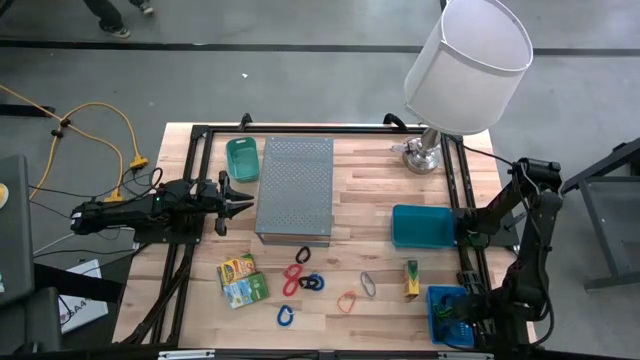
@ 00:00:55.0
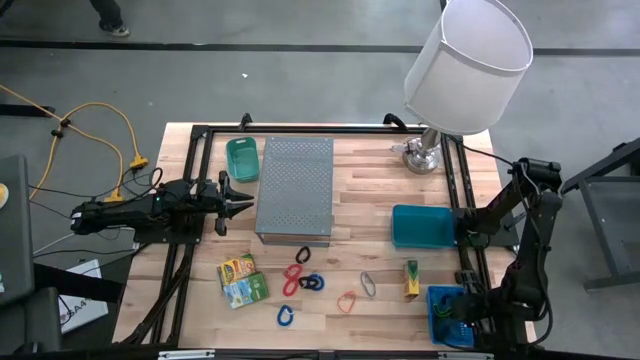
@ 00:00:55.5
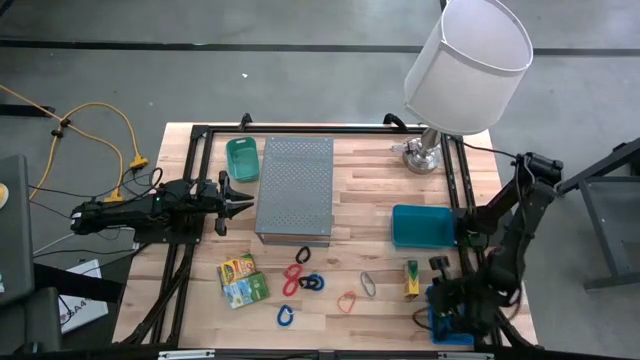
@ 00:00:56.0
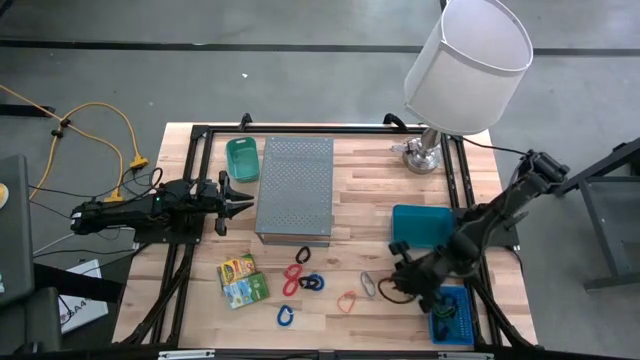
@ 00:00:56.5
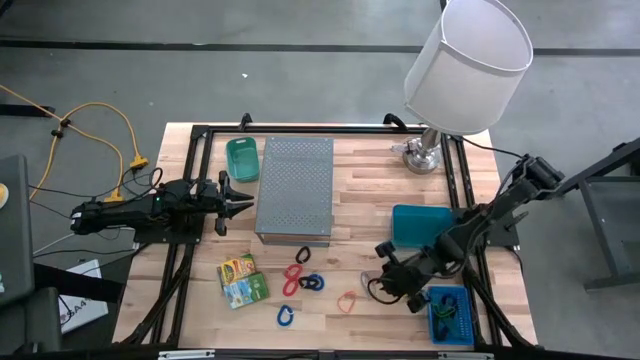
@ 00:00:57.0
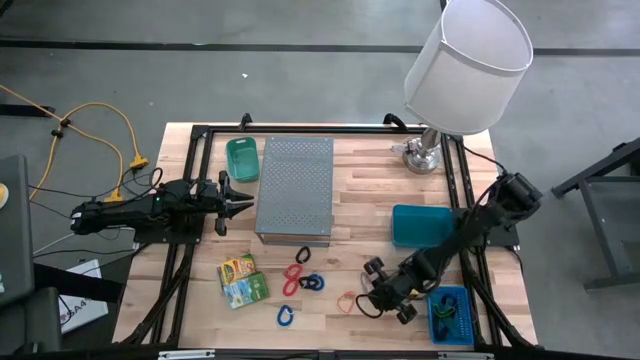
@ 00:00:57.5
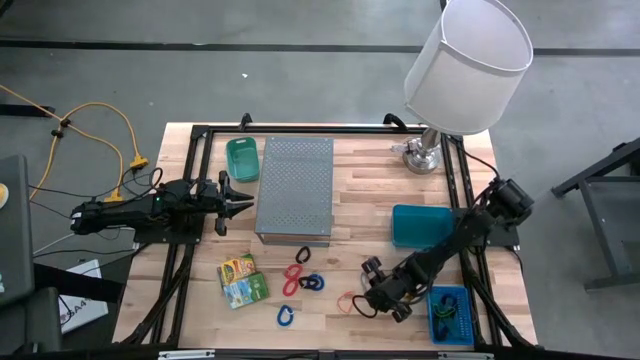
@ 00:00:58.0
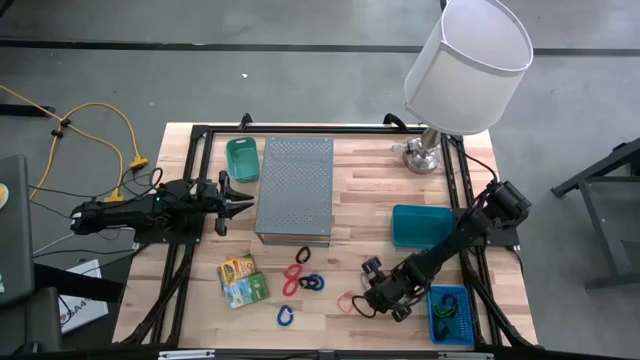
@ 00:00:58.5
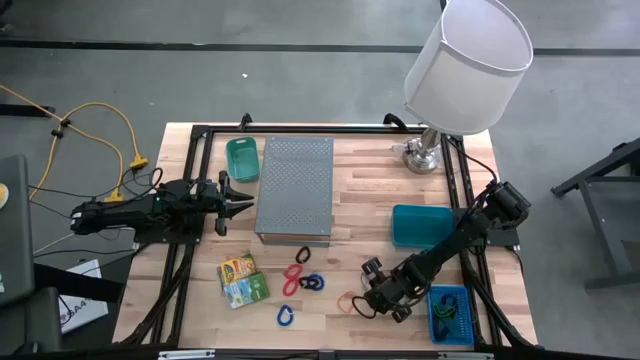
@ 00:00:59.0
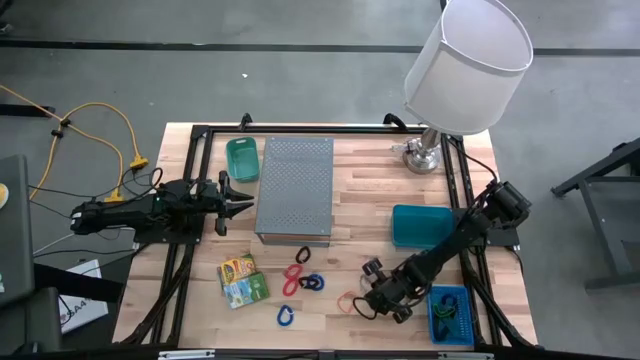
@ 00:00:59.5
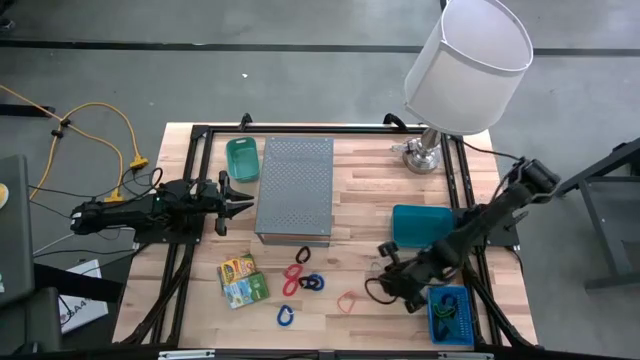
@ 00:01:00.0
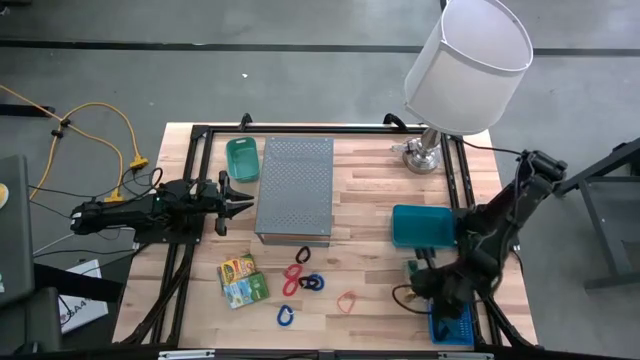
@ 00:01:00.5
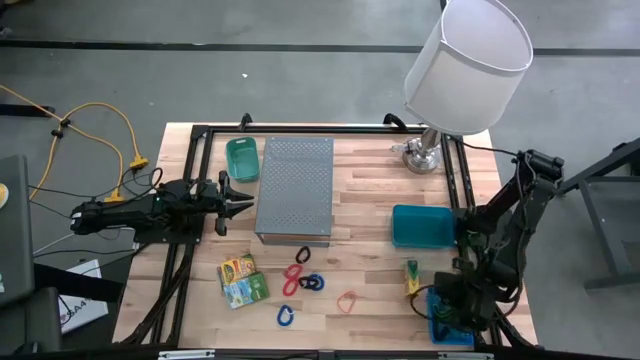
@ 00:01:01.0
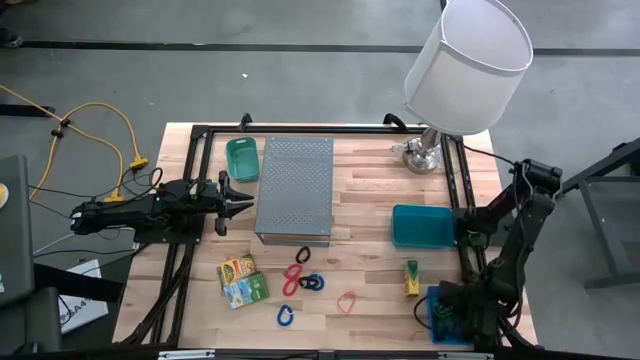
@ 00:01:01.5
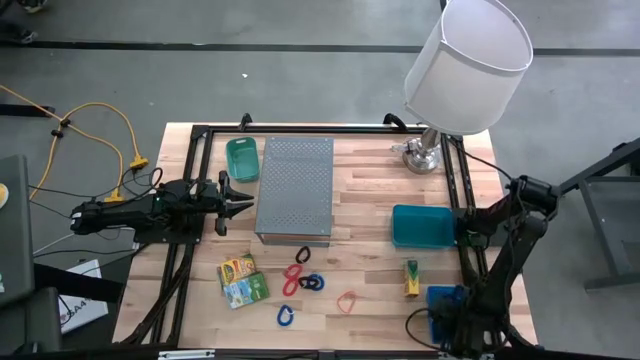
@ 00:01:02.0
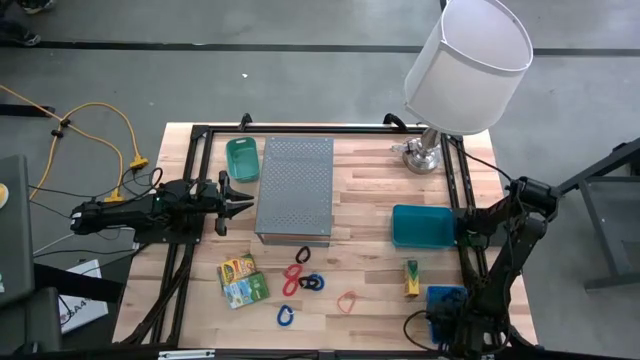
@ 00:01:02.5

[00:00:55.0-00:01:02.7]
Task: Pick & Place Office Desk Supplies
Put the blue rubberband into the blue basket

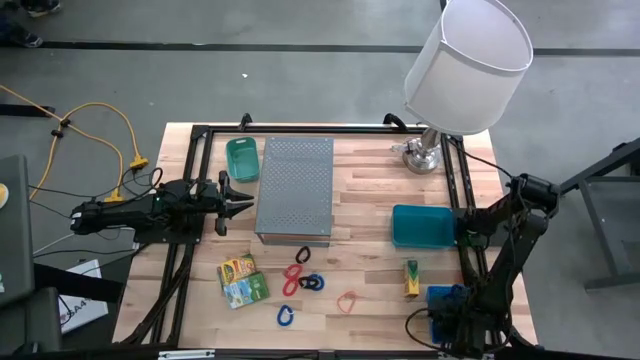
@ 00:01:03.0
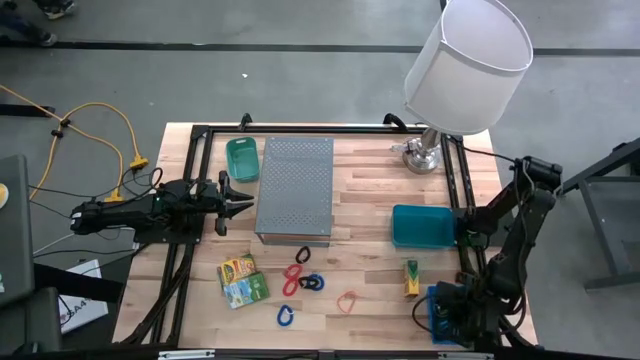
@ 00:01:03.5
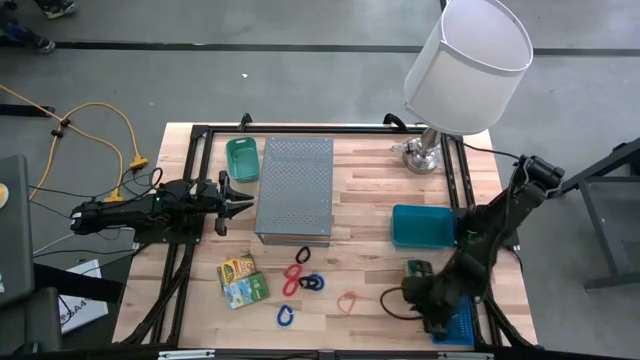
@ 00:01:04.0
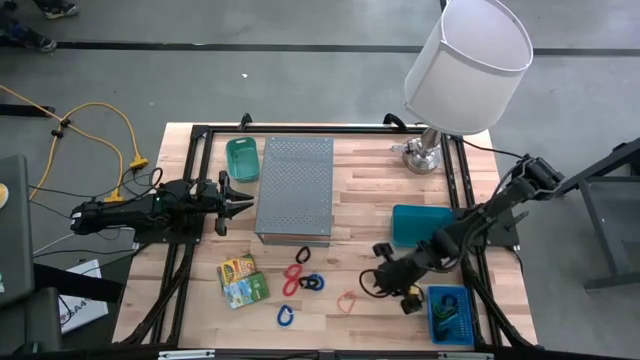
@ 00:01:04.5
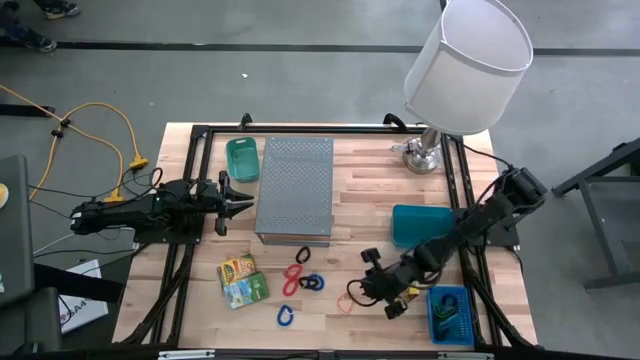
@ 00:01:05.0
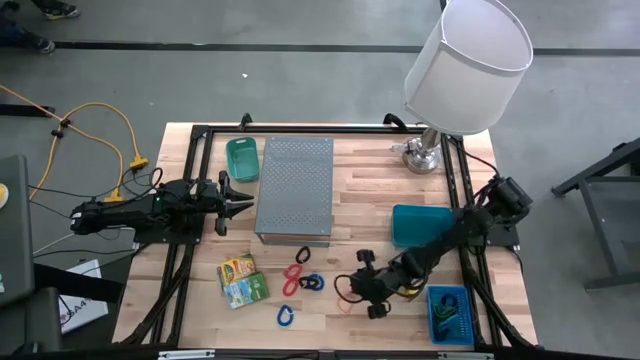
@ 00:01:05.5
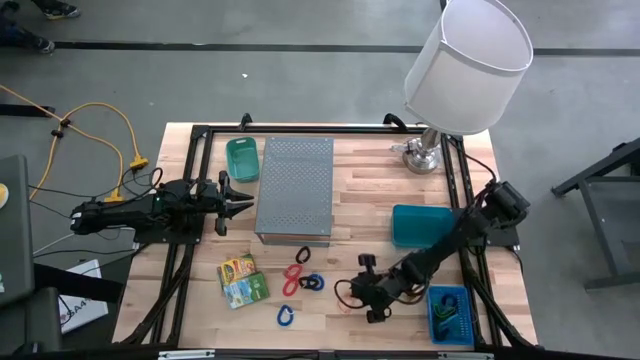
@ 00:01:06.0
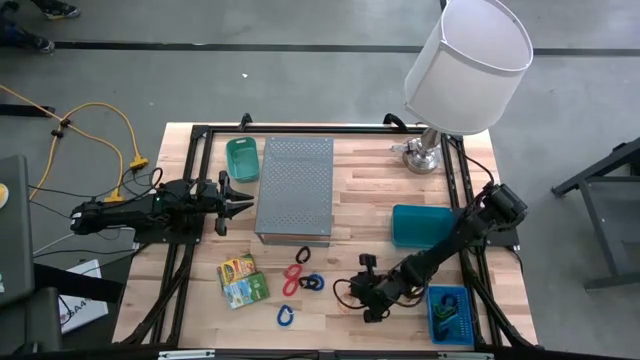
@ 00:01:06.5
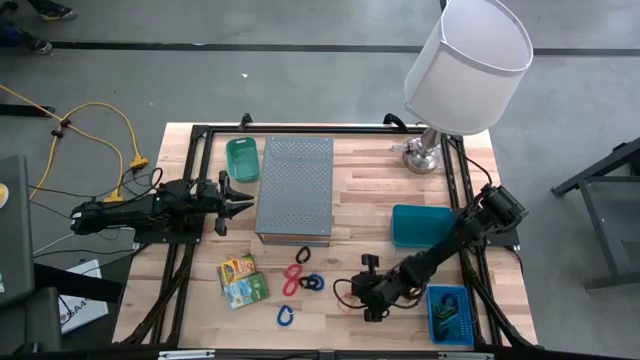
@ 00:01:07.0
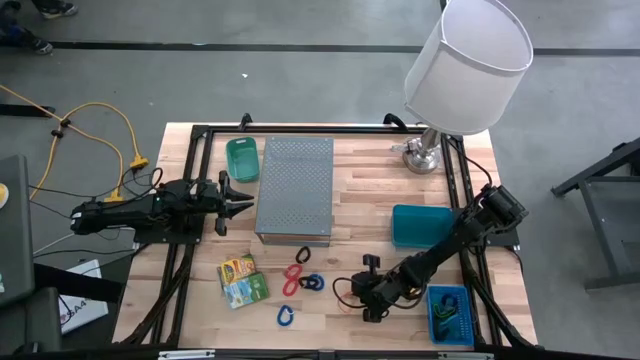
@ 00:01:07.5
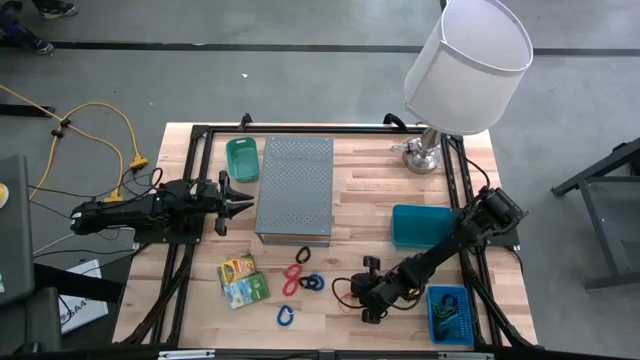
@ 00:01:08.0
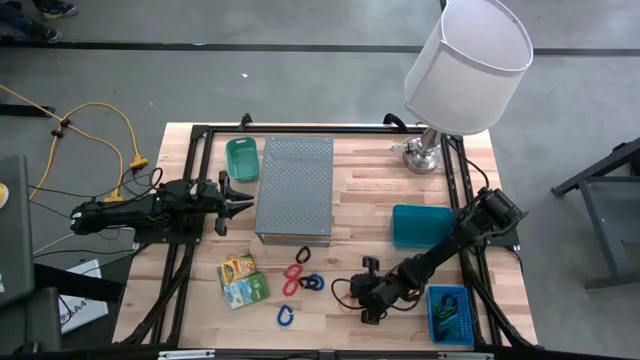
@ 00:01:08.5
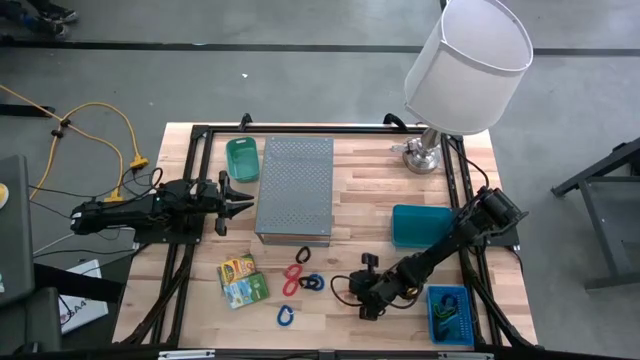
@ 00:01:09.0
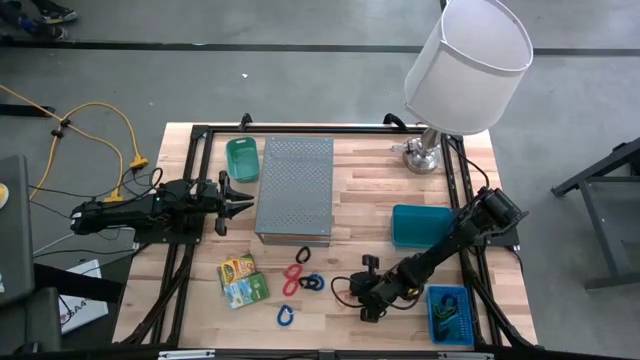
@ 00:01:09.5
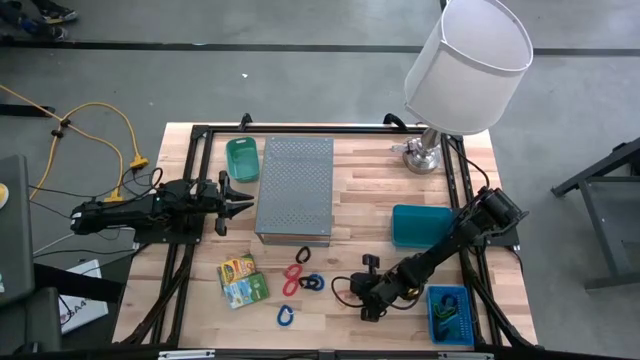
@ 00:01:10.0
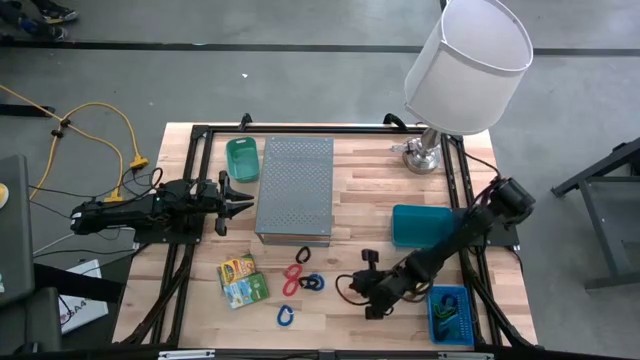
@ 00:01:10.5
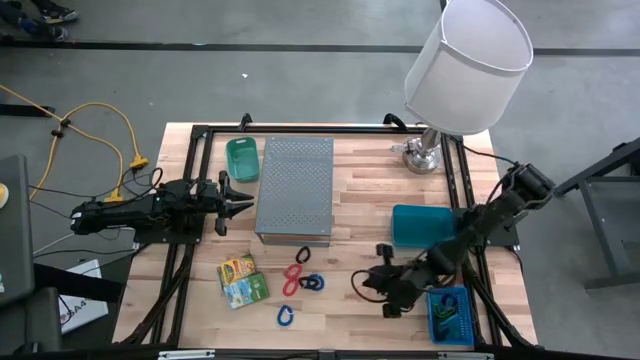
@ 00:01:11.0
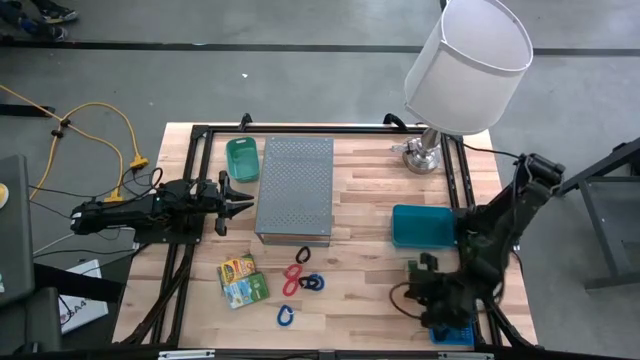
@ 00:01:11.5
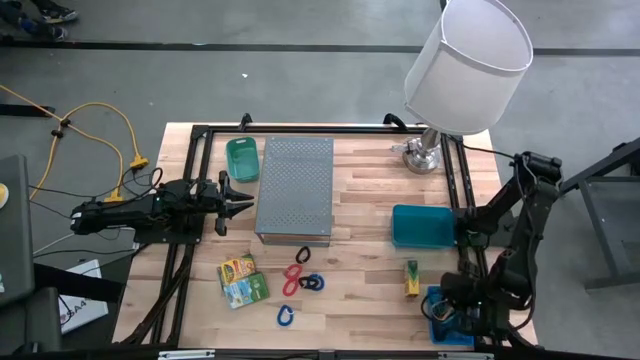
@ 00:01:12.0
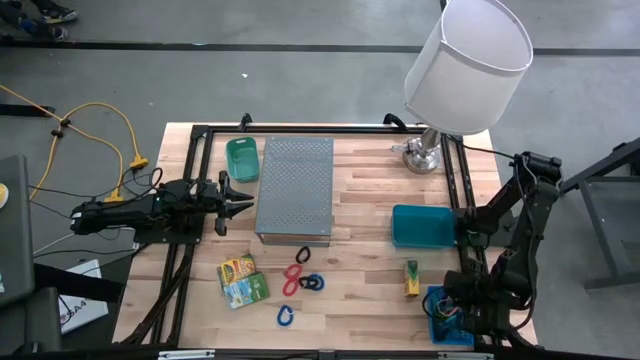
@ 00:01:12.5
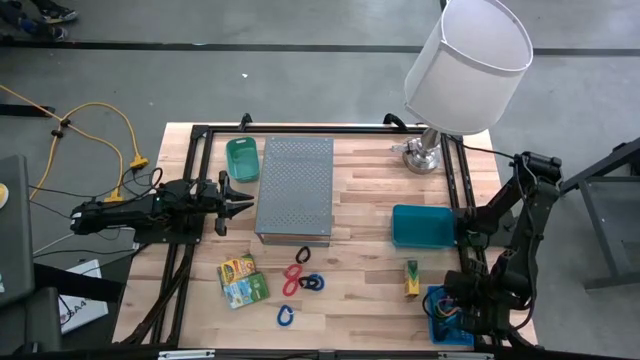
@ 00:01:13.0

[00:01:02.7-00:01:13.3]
Put the orange rubberband into the blue basket

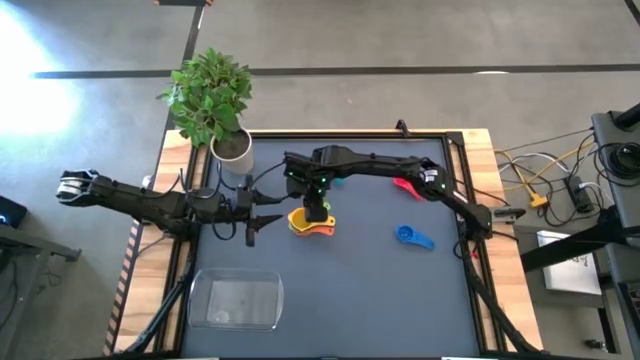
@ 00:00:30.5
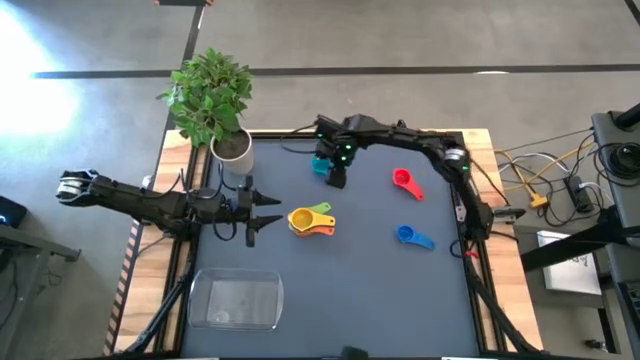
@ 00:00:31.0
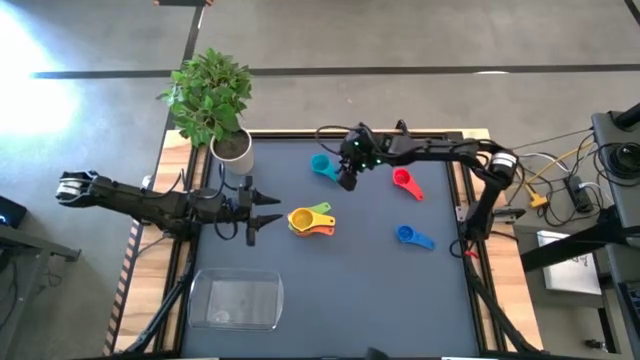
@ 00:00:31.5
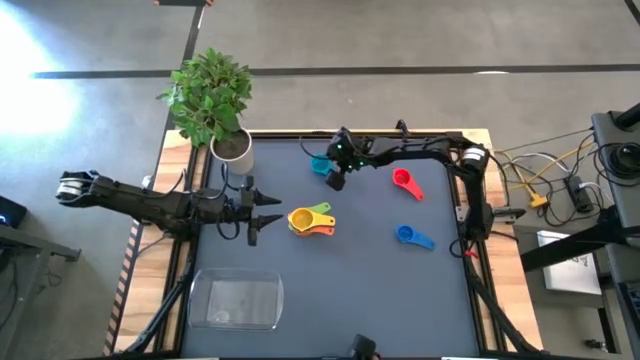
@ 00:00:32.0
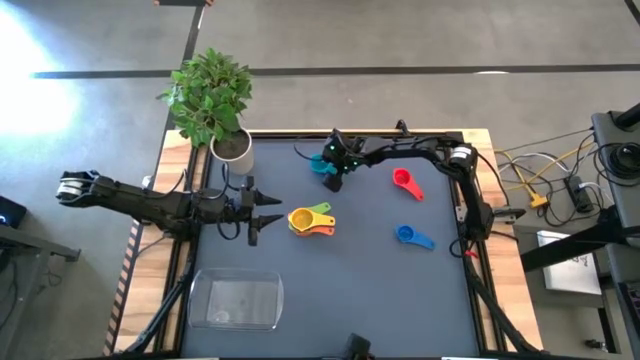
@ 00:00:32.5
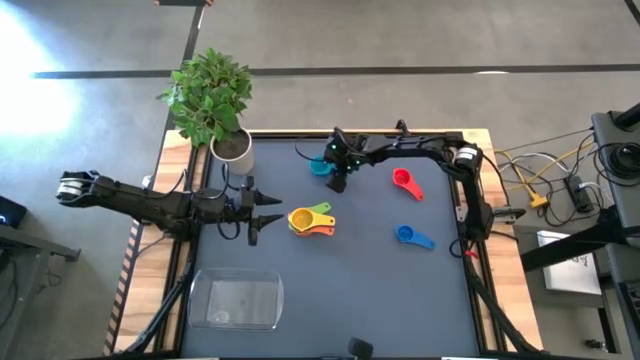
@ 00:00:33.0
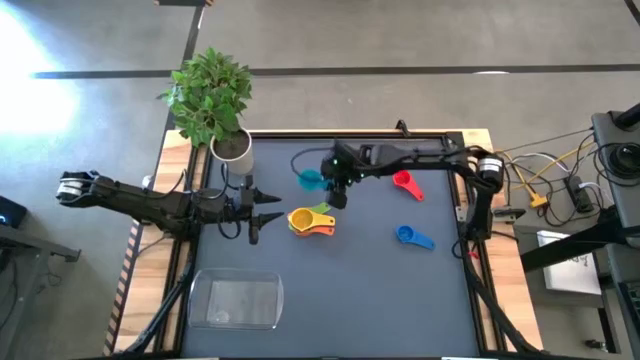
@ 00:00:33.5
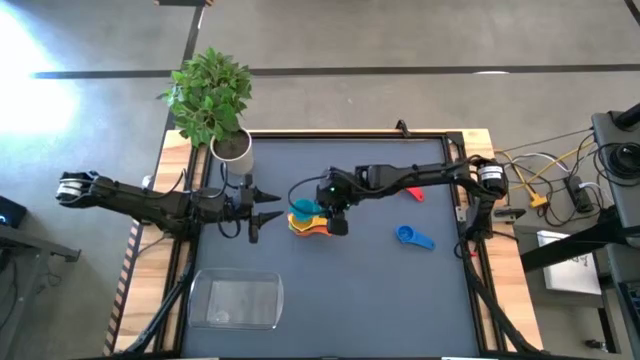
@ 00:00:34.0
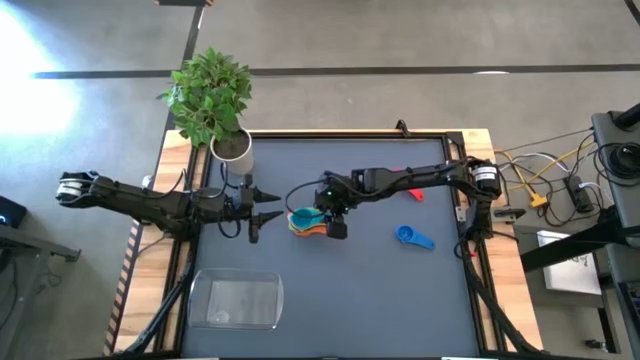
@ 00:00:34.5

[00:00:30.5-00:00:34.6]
Task: Nest measuring cups in basket
Stack the light blue measuring cup on top of the yellow measuring cup
